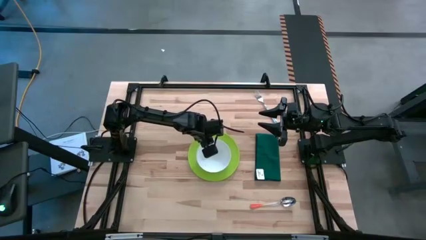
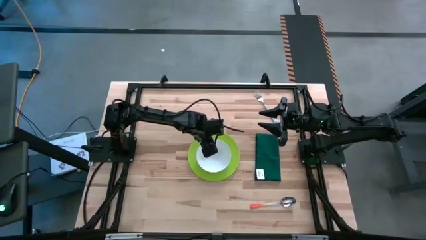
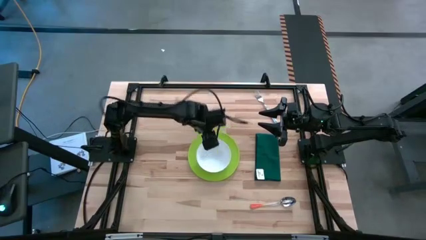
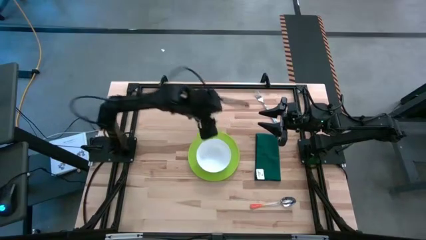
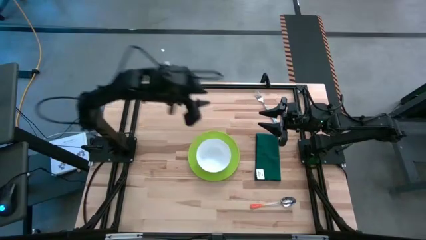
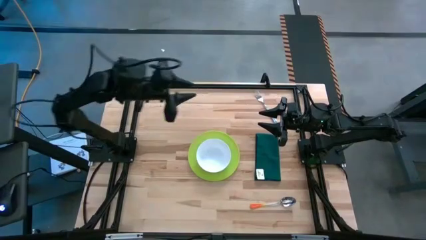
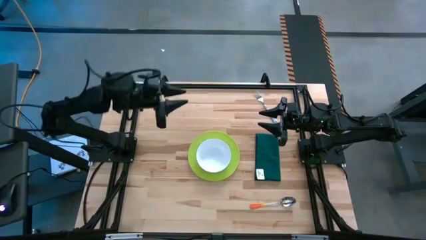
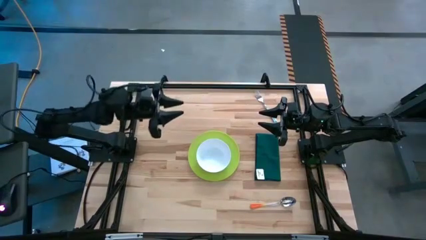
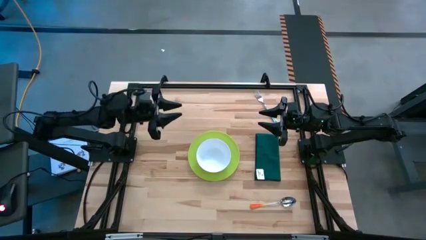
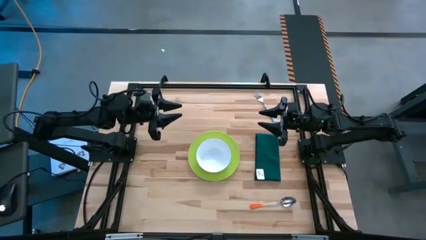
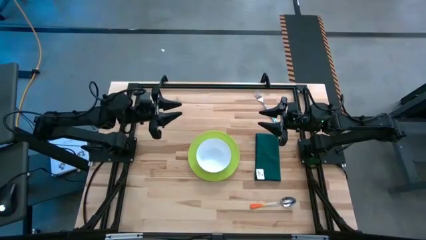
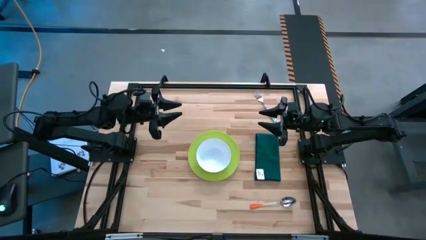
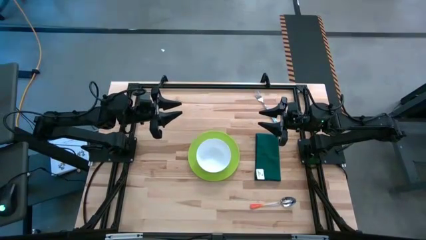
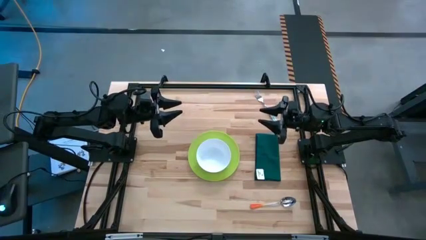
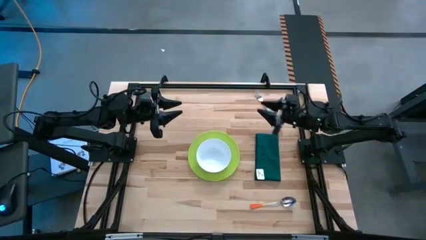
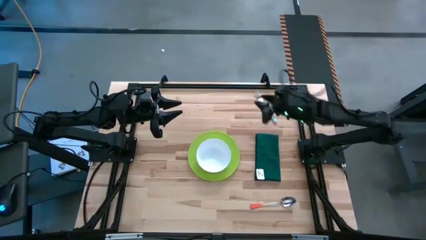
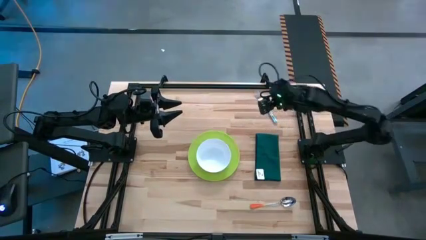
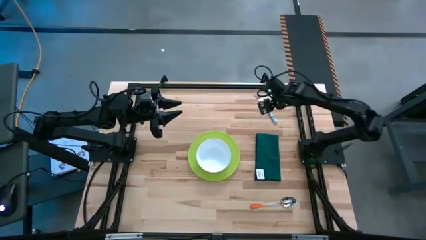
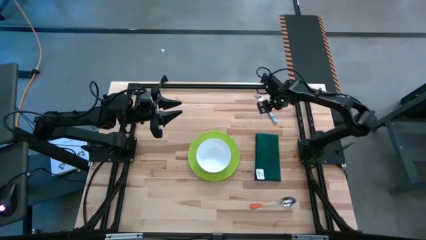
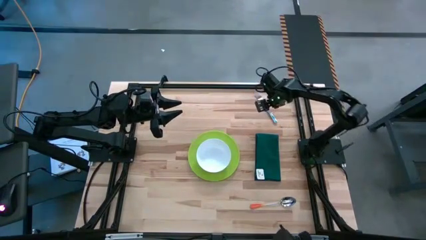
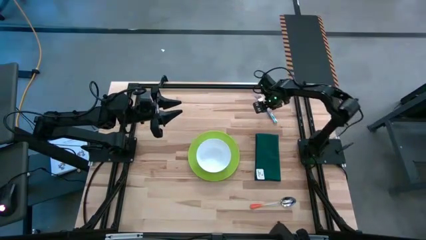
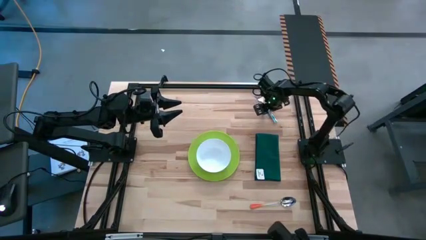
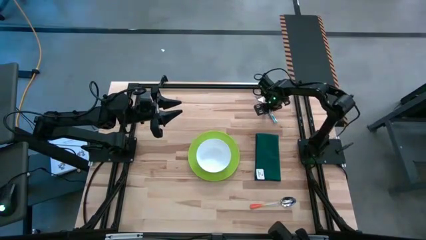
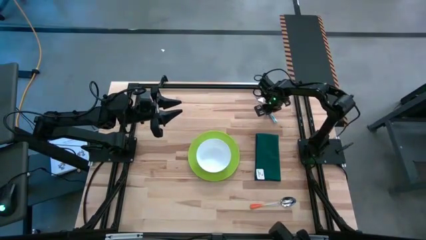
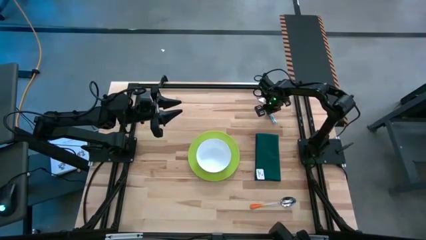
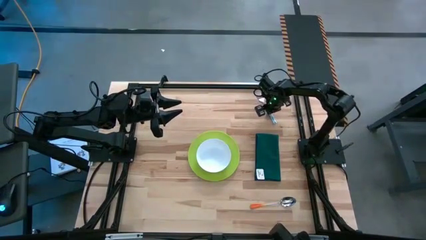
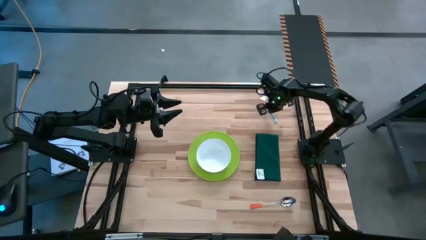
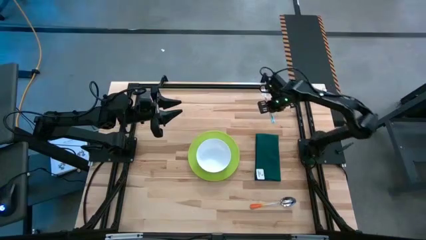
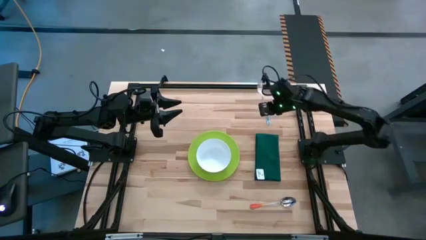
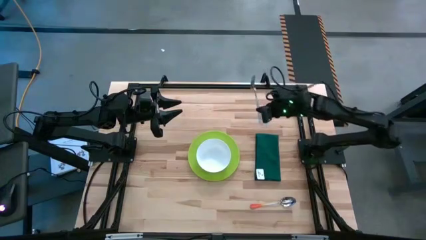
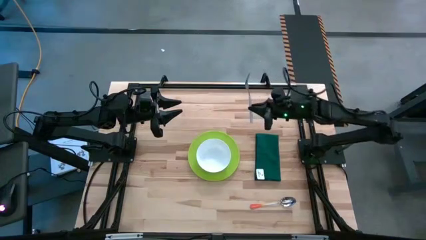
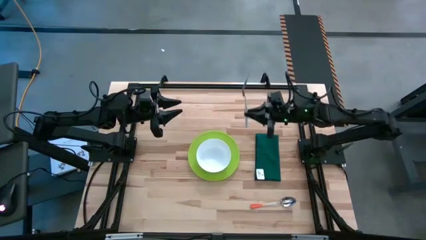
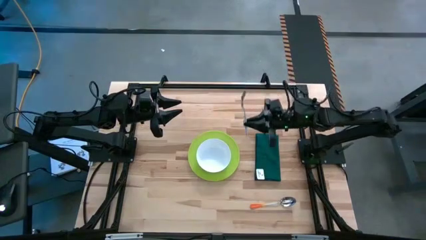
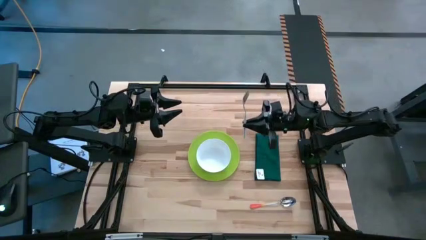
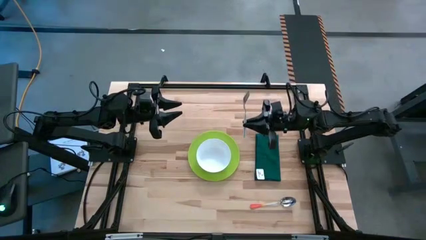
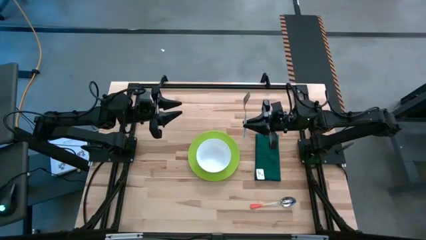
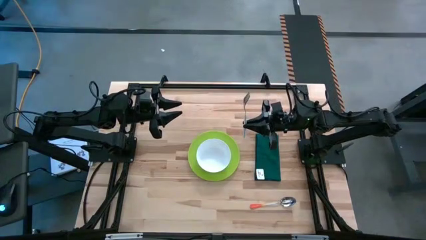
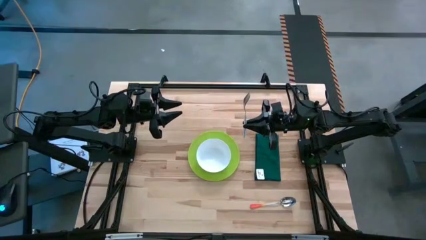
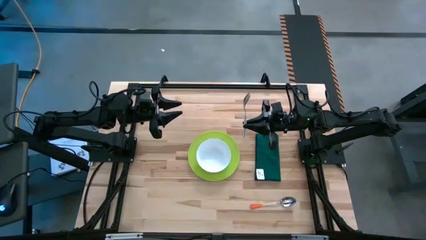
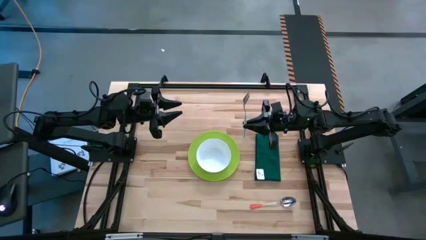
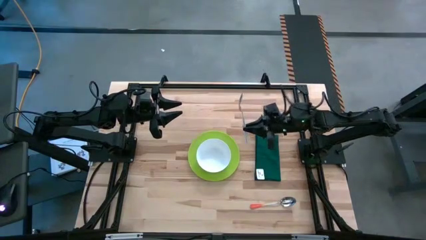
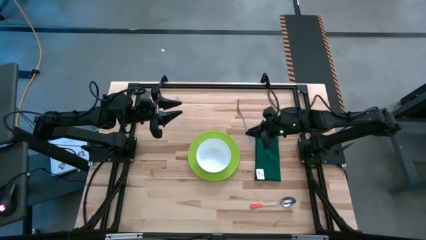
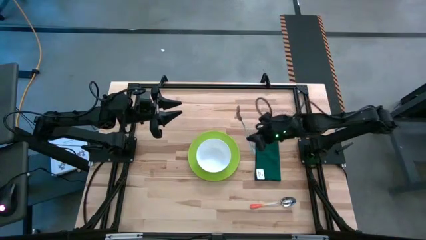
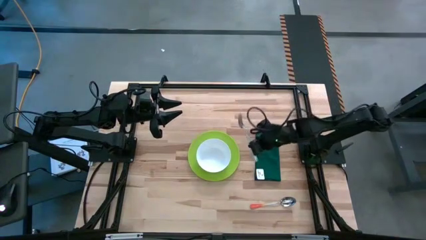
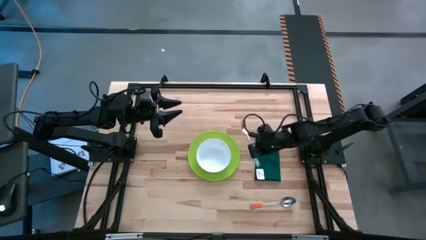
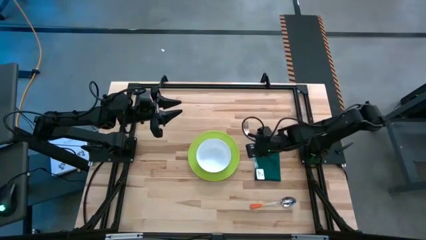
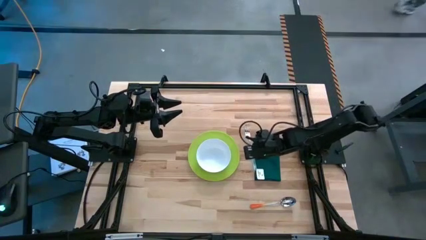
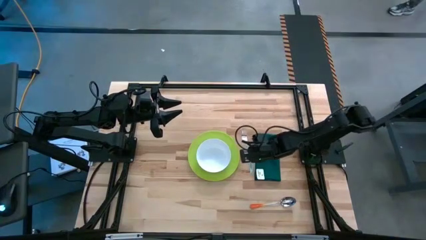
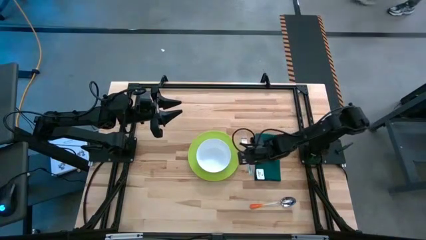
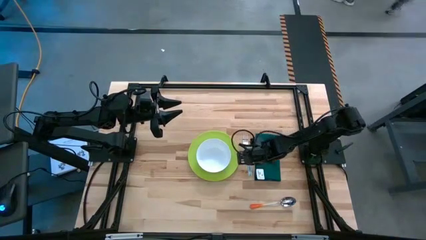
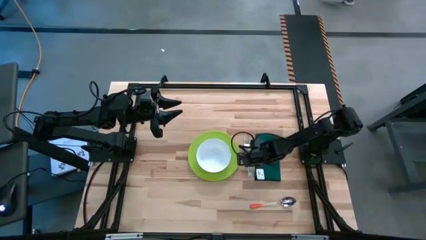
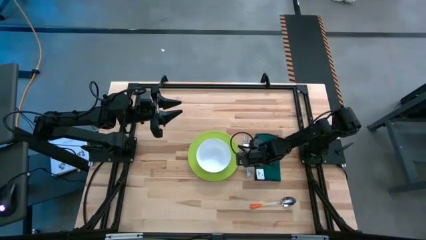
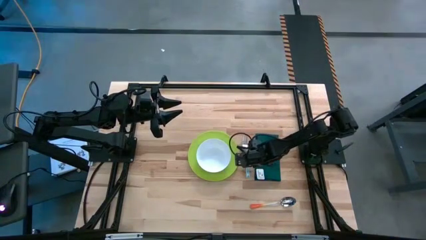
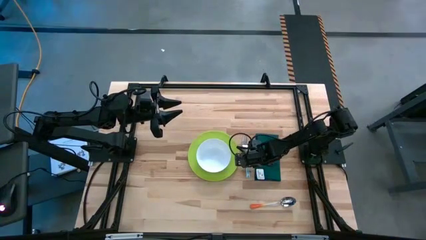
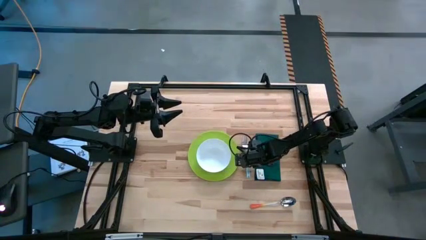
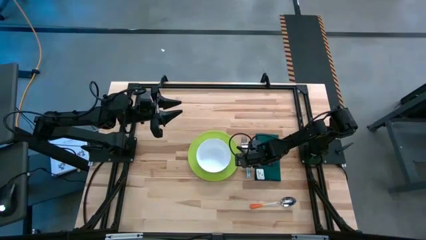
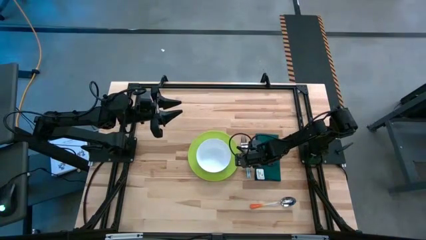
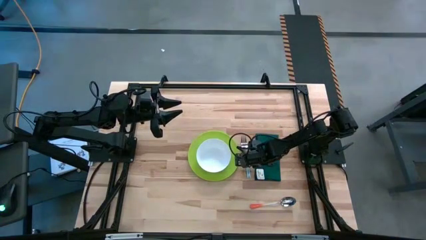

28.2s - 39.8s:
Task: Set table place
Put the fork to the right of the green plate

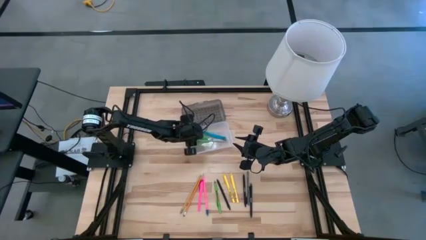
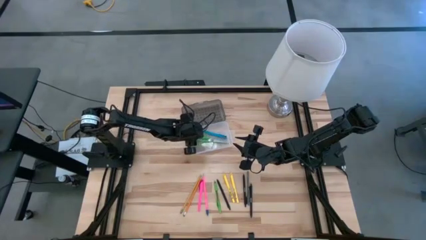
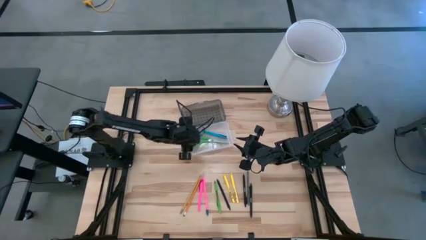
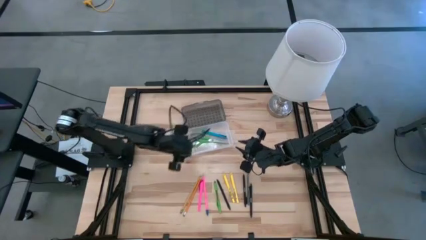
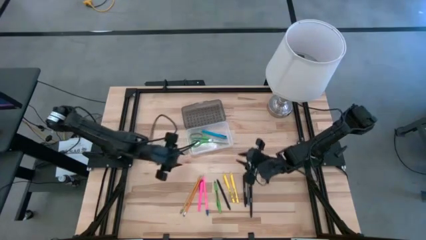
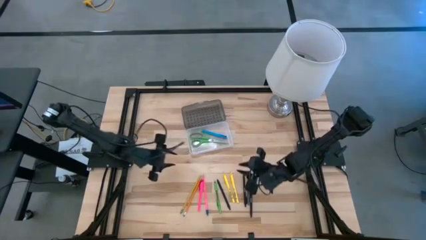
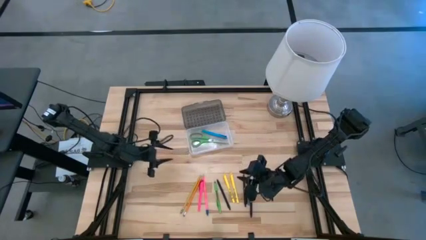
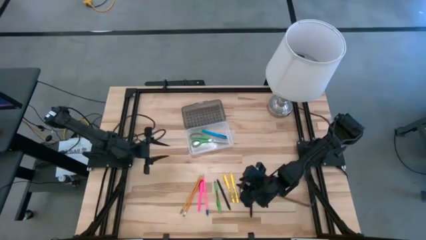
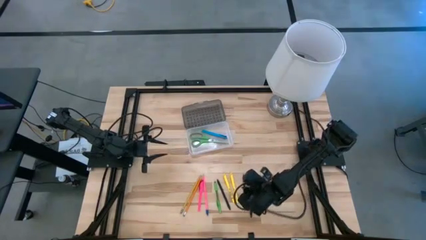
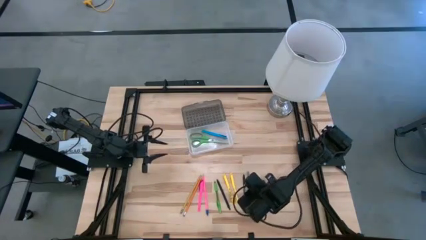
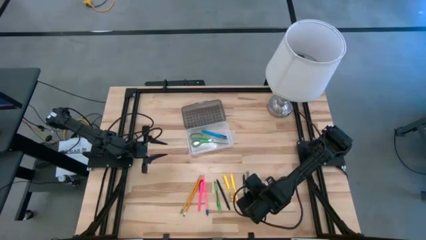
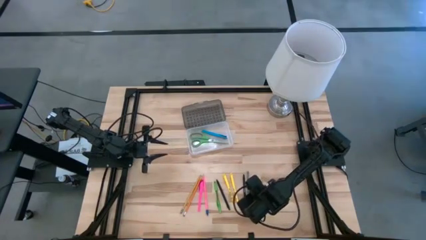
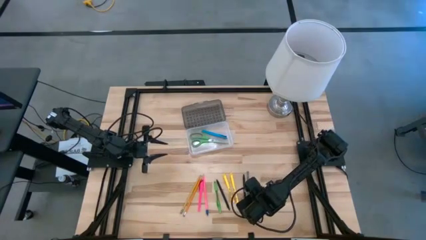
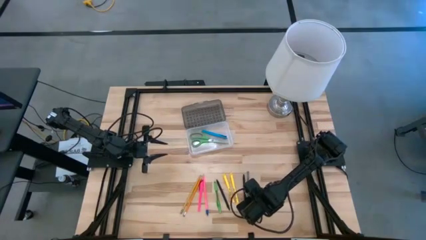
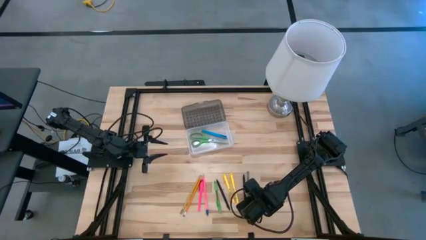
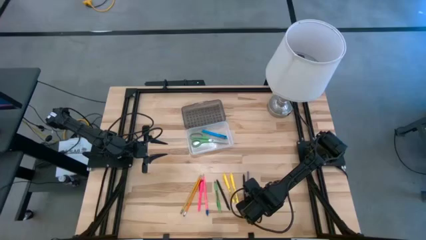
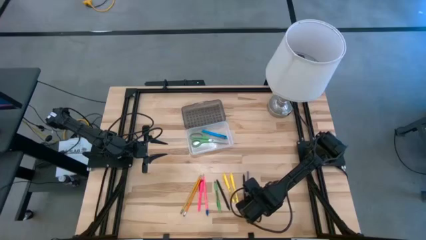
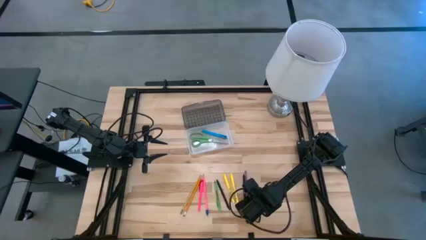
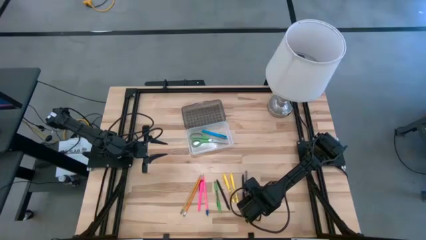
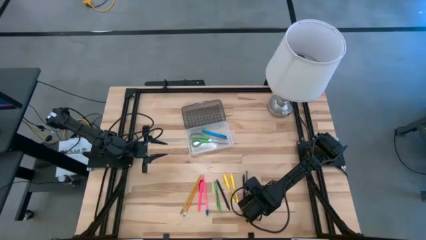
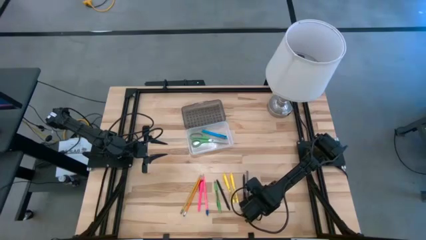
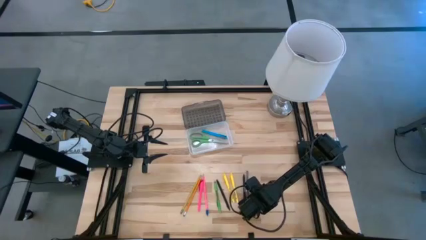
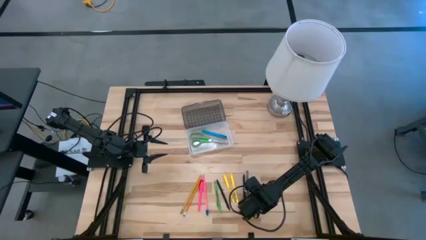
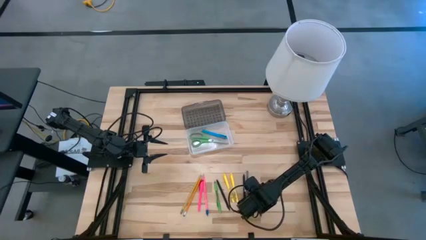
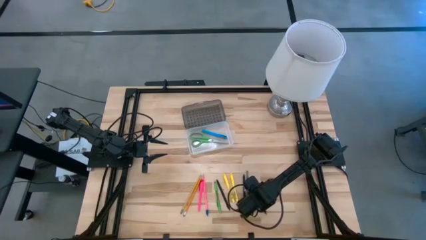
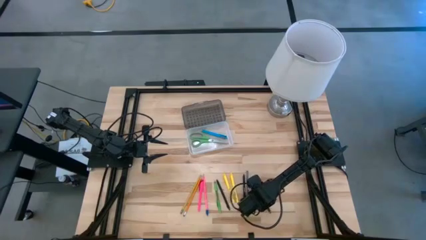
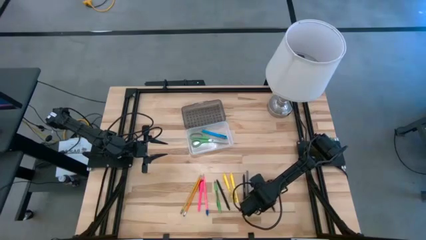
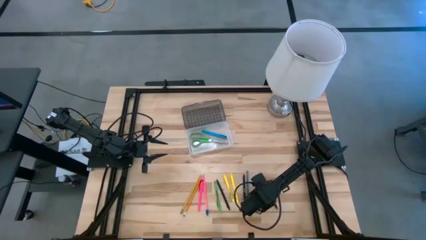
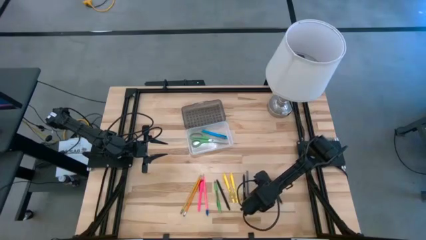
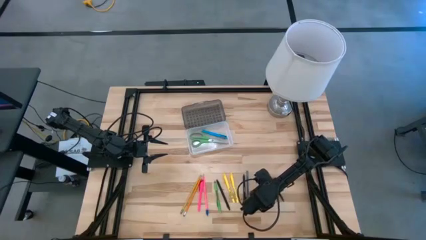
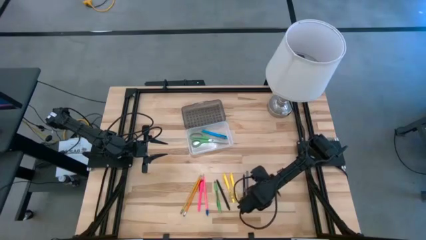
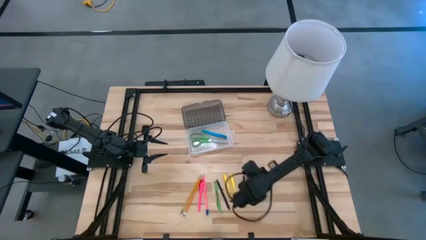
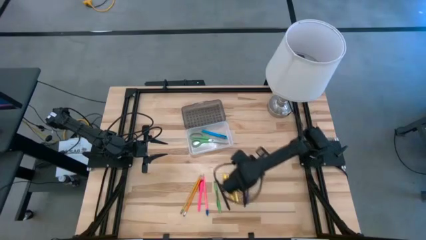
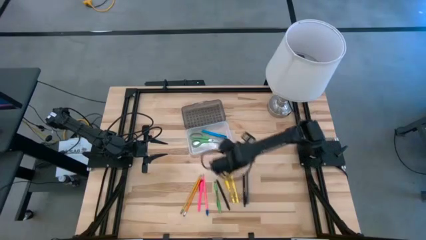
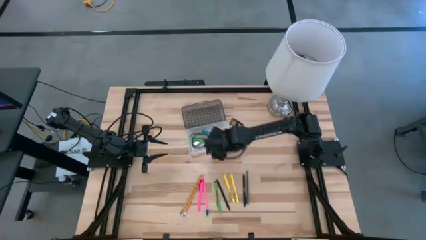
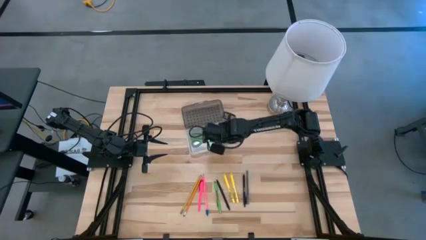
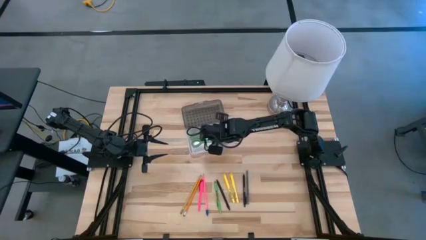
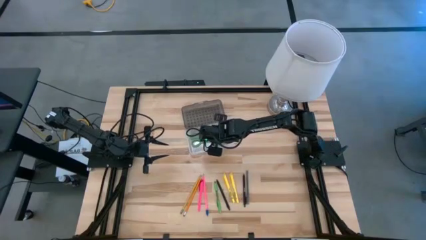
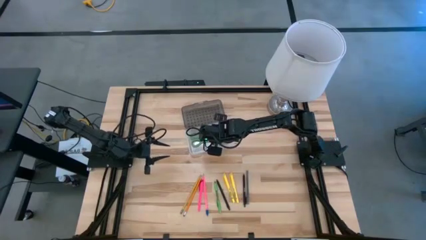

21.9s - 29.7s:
Task: Pick & place school supplies into a supply box
Put the right black pen into the transparent supply box
